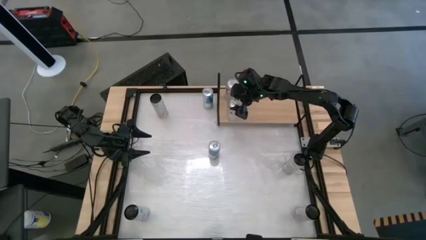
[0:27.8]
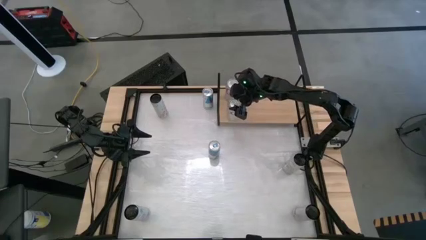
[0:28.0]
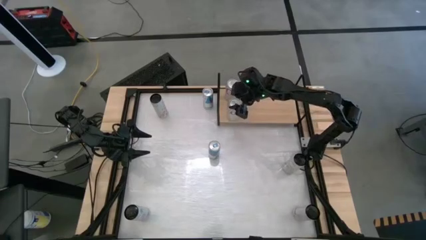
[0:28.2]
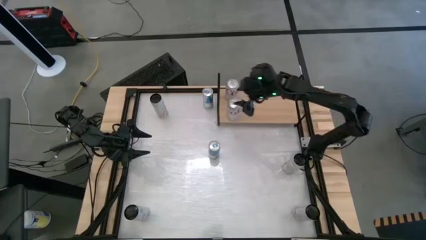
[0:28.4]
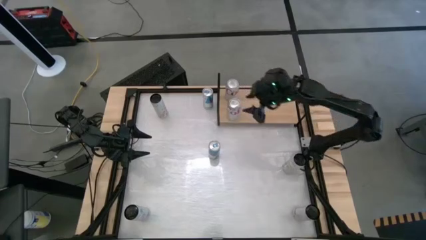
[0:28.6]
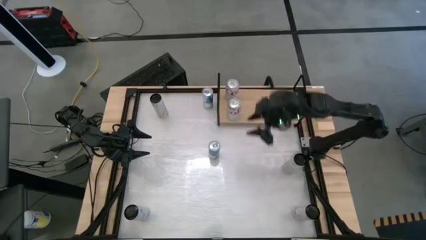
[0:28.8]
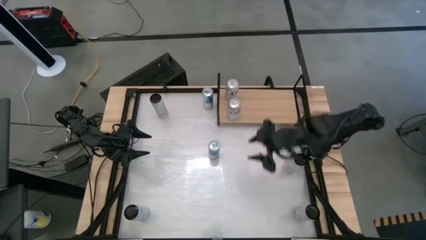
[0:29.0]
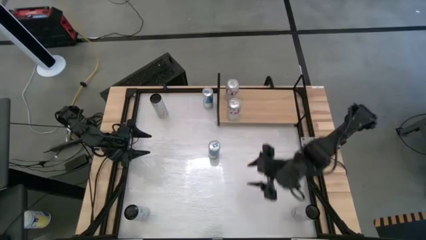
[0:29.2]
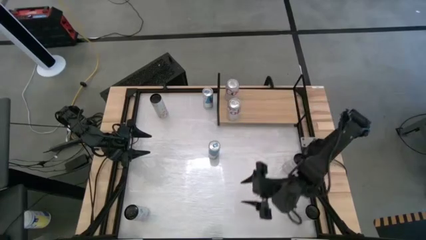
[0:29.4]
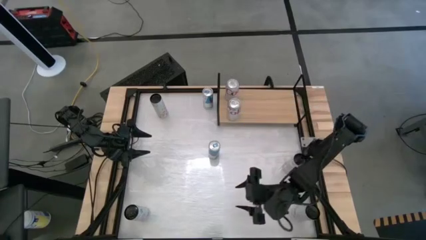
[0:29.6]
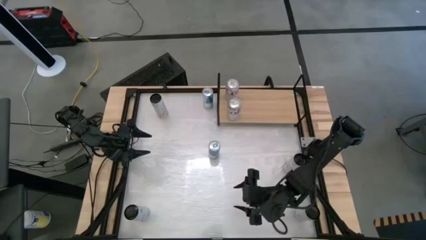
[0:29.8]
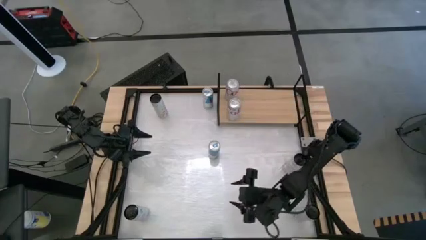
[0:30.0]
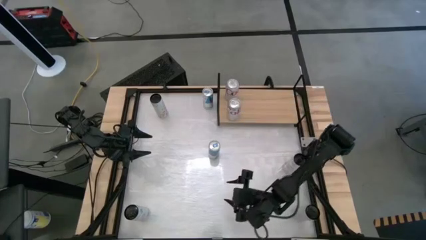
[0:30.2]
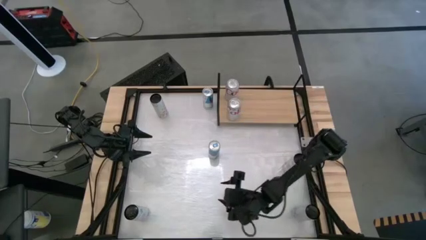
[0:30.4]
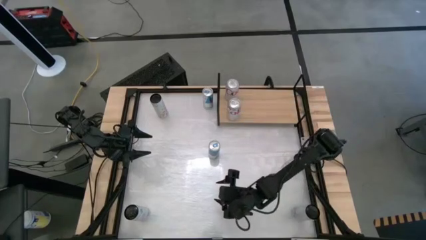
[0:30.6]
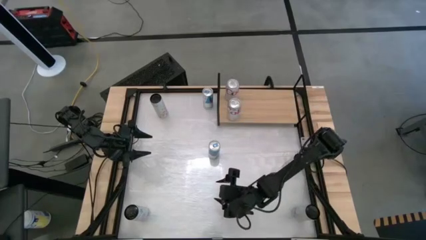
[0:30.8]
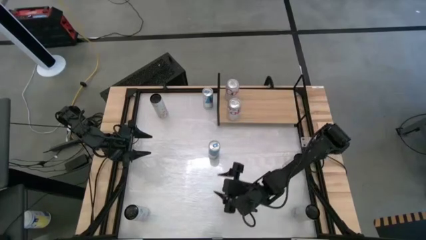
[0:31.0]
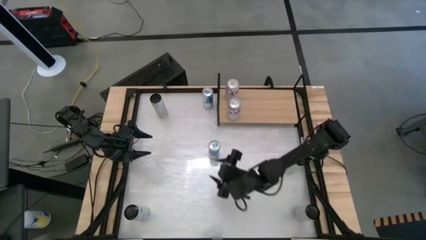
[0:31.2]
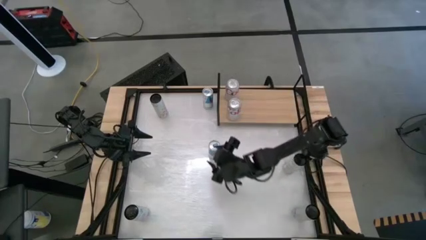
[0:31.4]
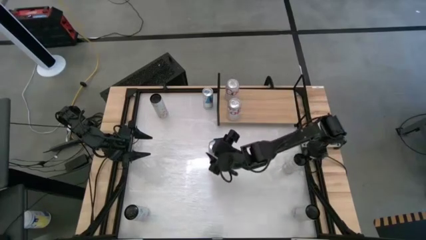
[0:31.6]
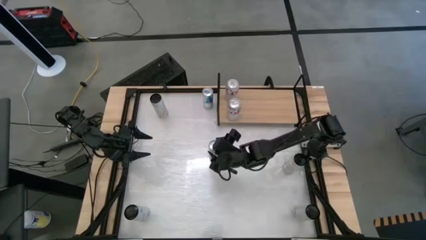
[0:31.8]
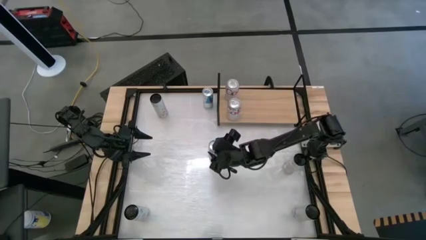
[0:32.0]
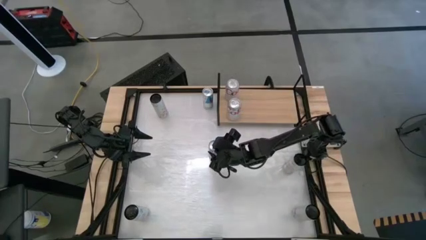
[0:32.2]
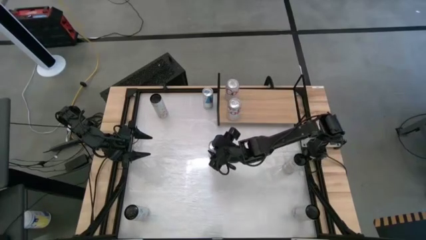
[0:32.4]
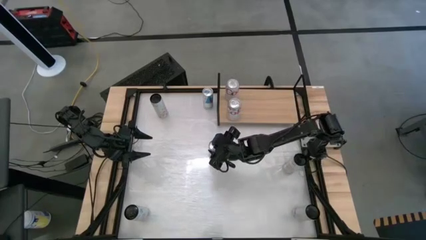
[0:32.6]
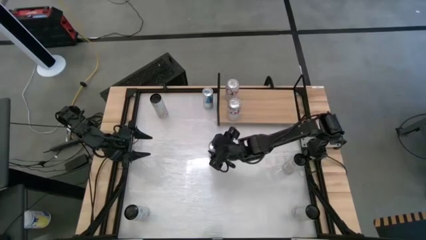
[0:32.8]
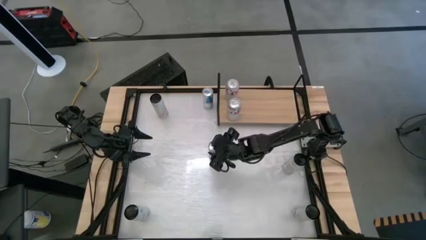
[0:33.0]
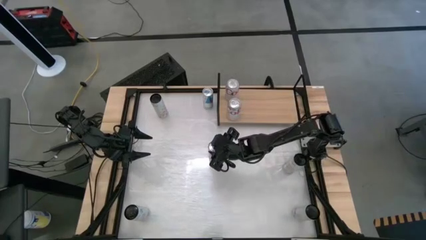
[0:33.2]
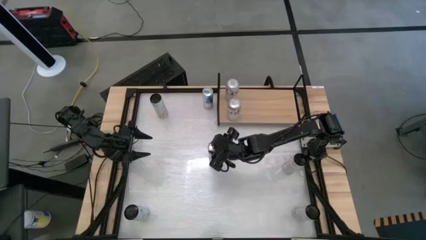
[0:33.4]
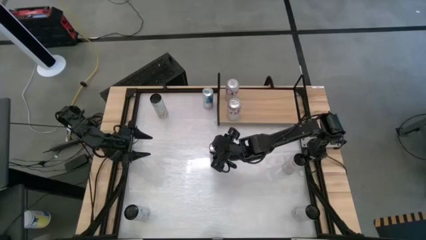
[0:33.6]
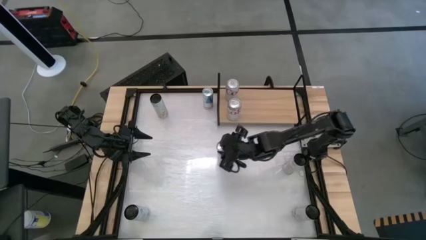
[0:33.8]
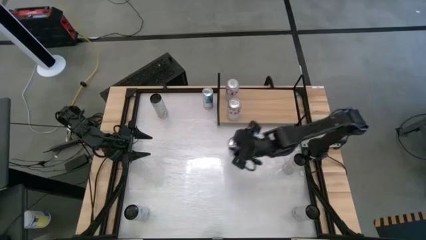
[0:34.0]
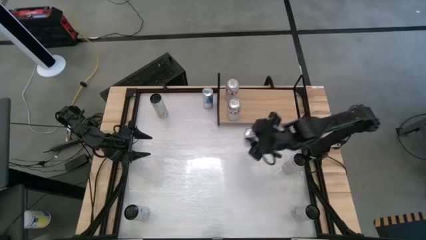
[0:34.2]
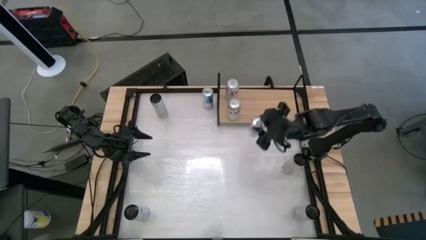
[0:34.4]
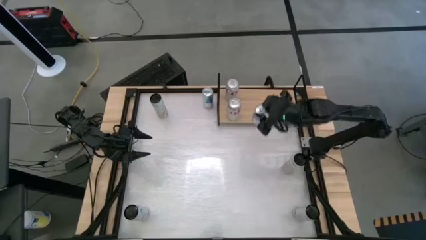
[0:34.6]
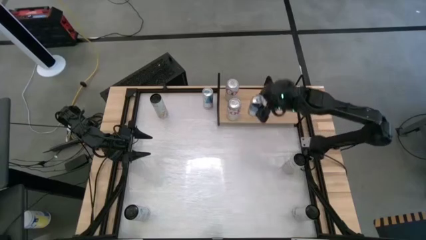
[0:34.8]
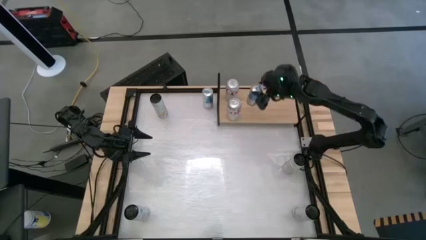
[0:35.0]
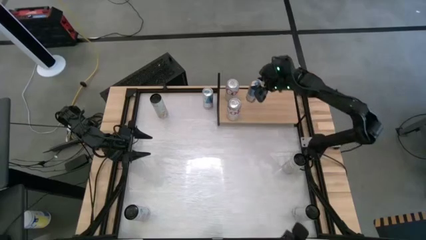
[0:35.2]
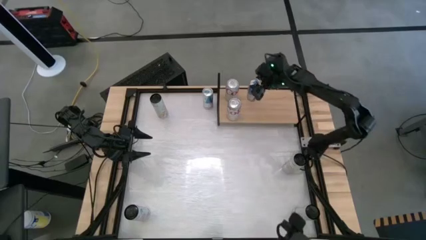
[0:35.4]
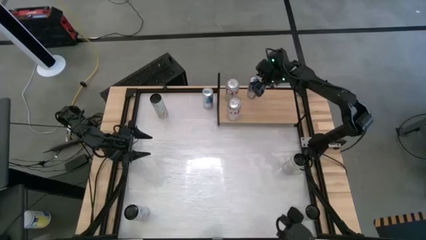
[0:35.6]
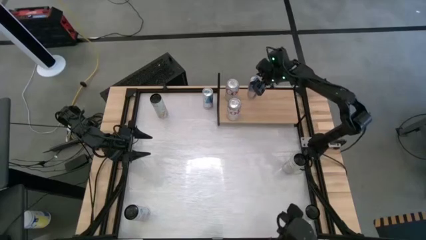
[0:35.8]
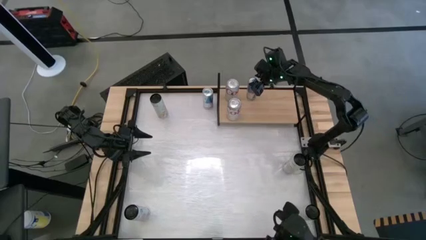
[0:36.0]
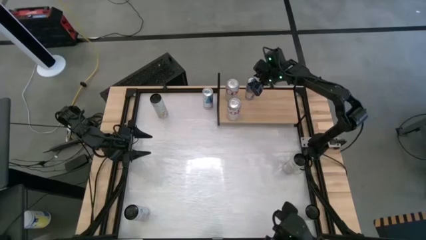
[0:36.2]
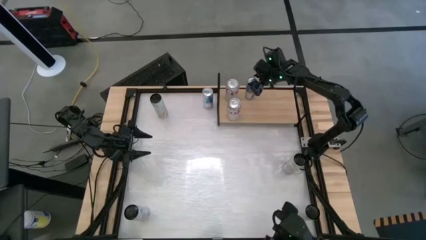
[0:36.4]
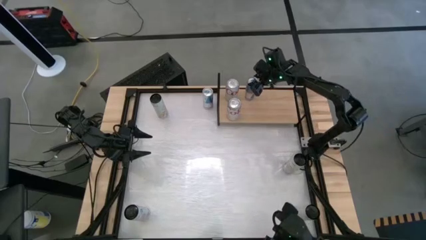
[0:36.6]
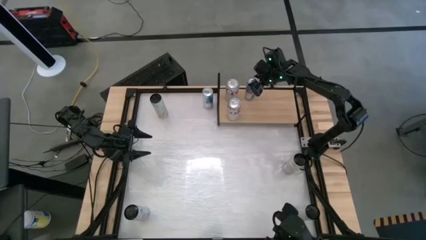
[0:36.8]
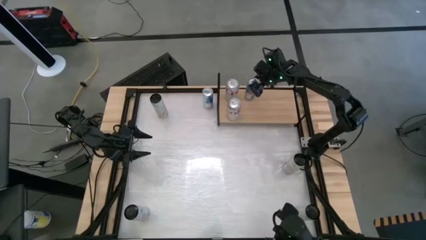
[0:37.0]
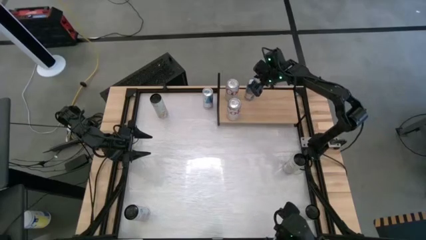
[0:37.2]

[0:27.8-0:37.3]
Task: Place canned beverage on shelf
Put the bottom blue can on the shelf

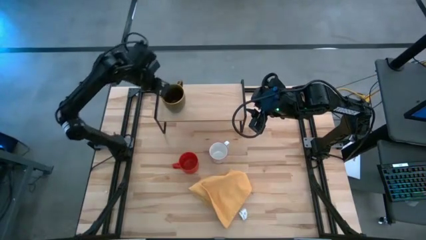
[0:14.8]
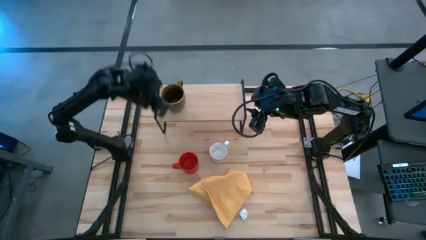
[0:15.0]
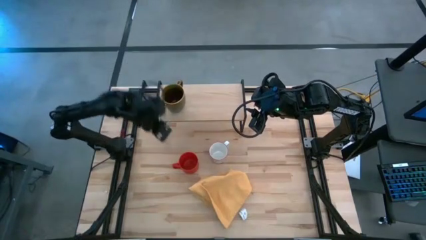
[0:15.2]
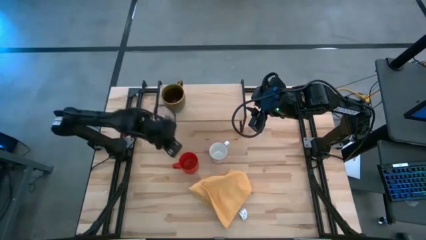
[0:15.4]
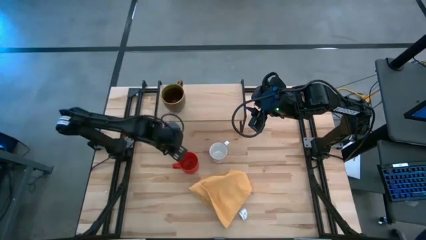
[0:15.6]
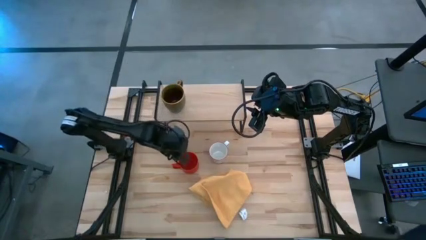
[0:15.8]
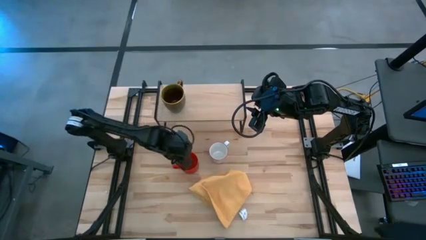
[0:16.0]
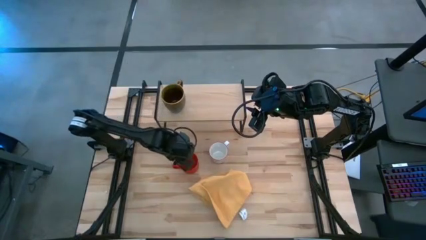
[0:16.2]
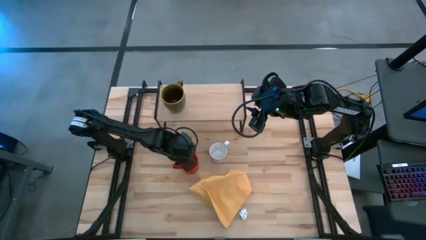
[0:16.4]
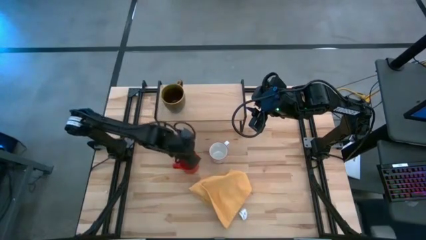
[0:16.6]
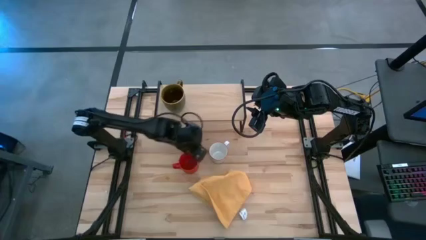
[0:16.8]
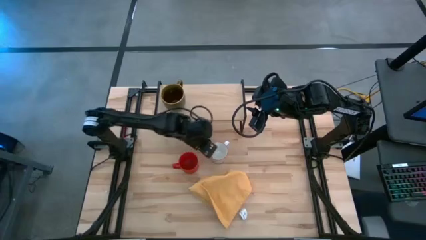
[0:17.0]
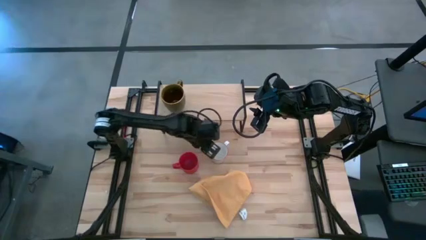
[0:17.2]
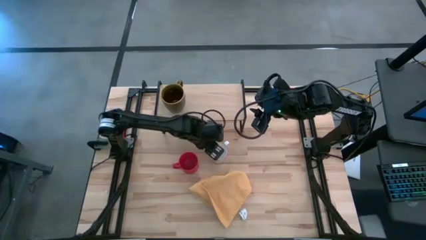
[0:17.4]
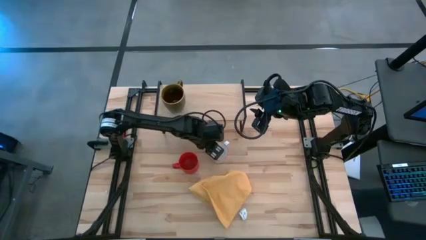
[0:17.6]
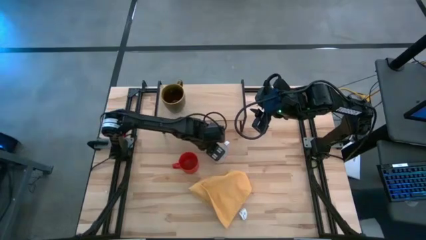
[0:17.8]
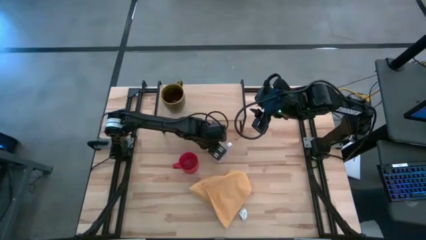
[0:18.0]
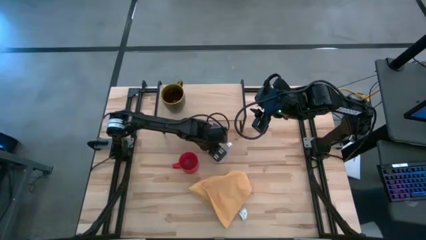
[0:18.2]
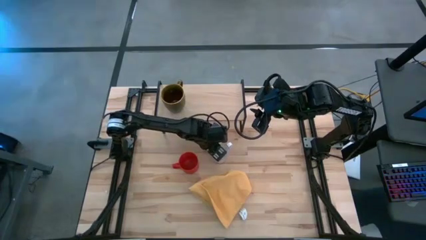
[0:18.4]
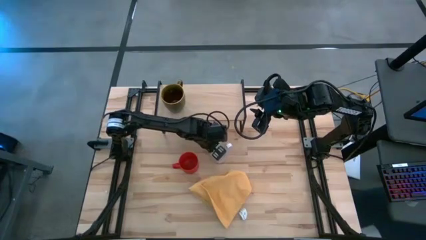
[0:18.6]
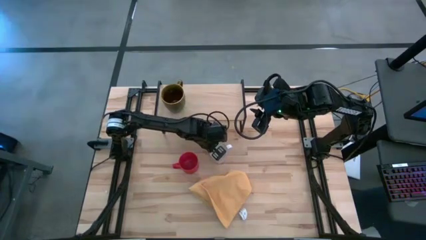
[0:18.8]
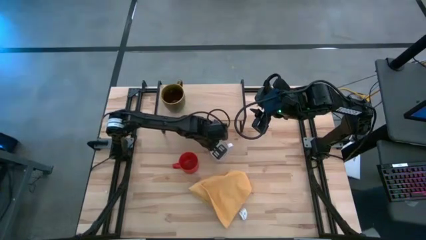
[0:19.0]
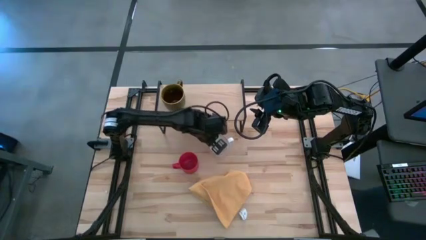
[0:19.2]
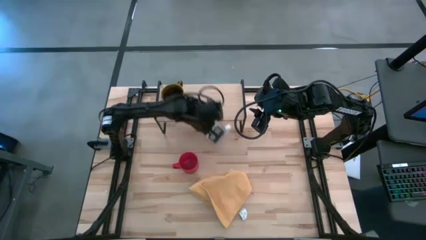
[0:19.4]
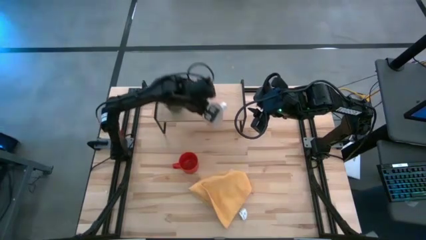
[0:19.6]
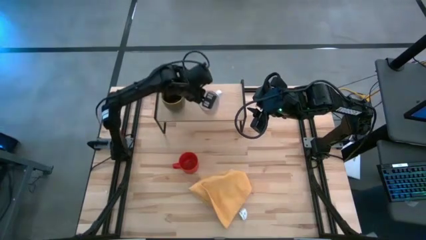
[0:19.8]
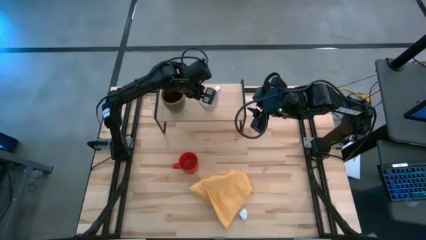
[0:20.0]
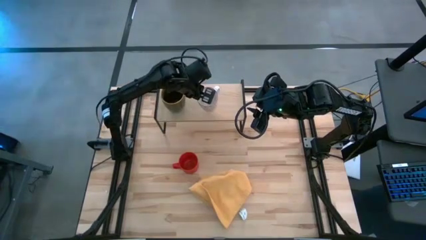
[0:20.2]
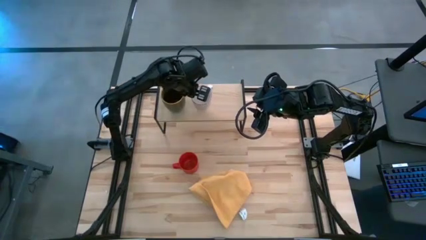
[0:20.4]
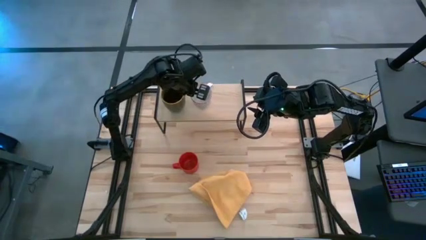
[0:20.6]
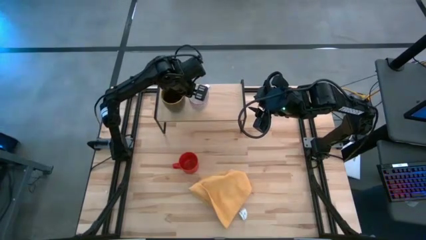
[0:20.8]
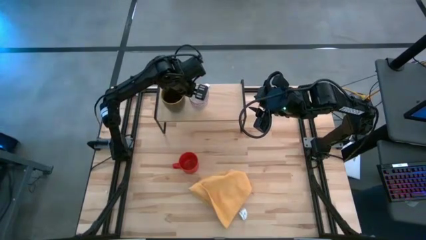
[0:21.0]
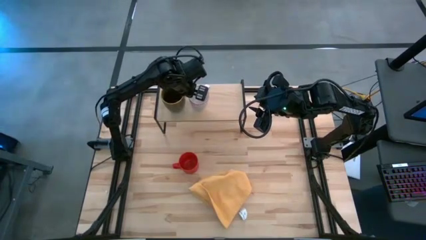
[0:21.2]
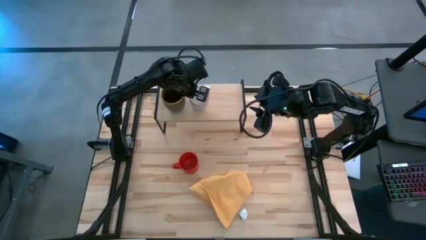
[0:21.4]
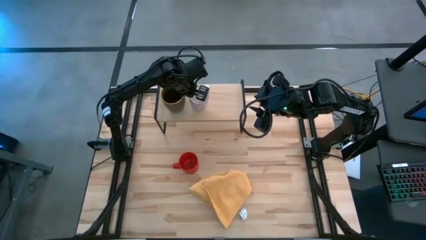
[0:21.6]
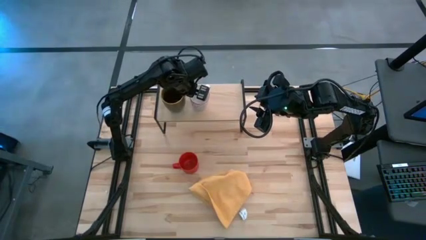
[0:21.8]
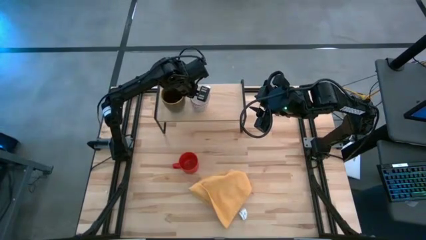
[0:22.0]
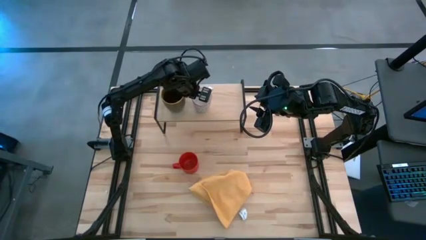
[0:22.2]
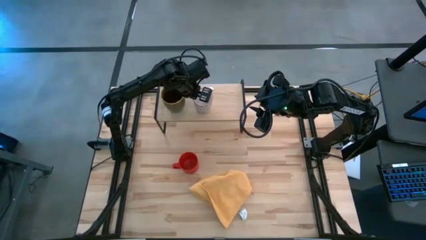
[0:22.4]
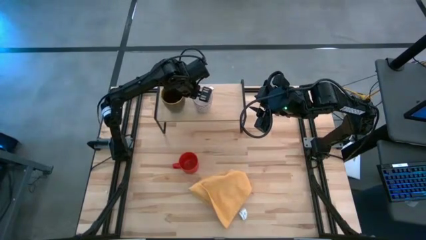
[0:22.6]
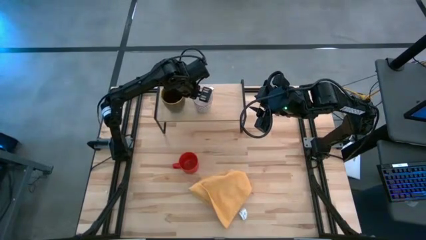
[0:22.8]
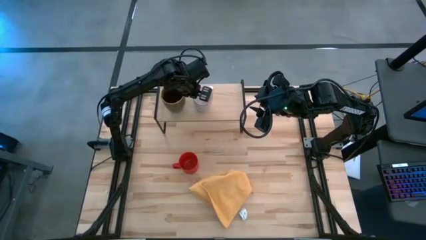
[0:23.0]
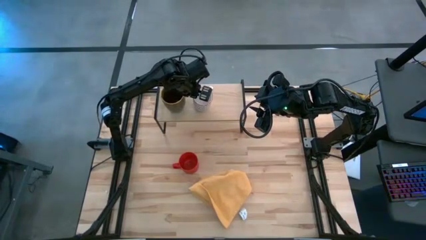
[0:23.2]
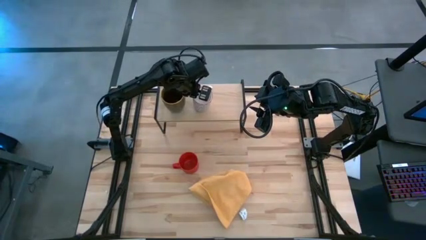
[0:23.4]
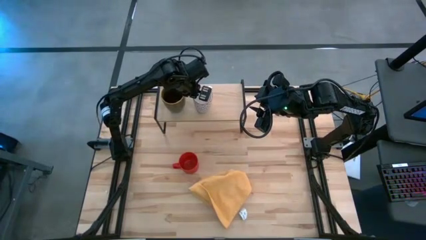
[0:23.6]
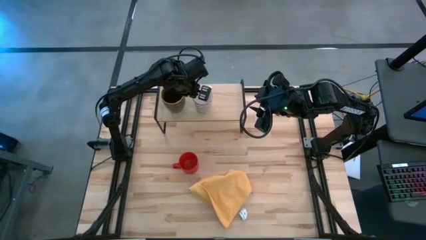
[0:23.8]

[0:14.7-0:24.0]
Task: Stack small to large cups/mugs on shelf
Put the gray mug on the shelf
